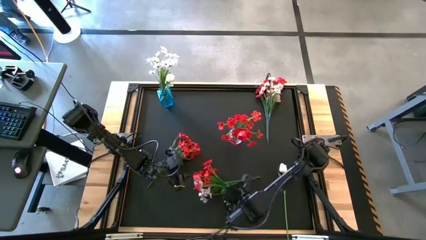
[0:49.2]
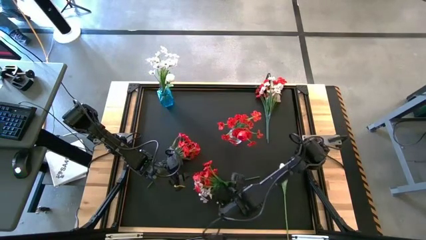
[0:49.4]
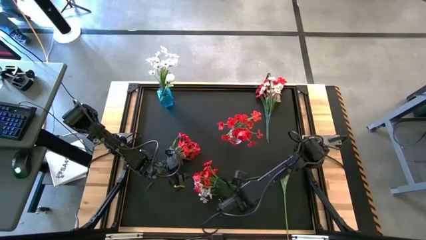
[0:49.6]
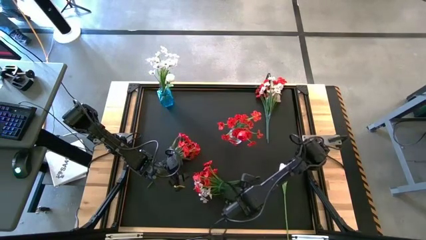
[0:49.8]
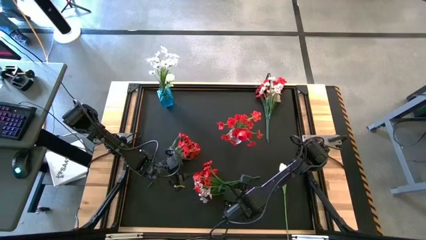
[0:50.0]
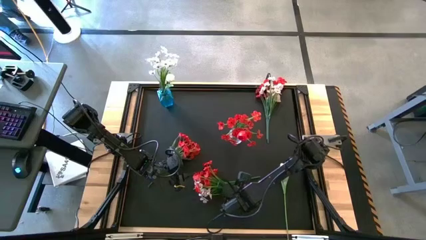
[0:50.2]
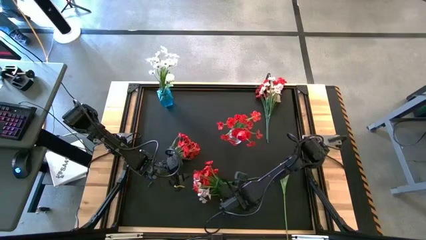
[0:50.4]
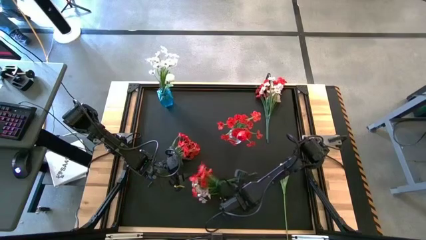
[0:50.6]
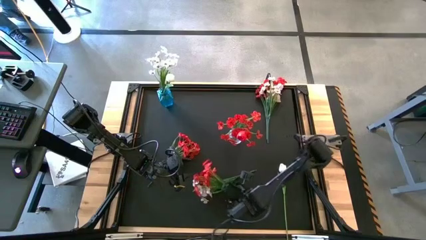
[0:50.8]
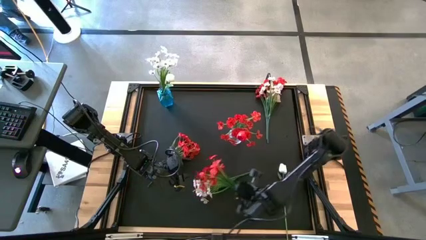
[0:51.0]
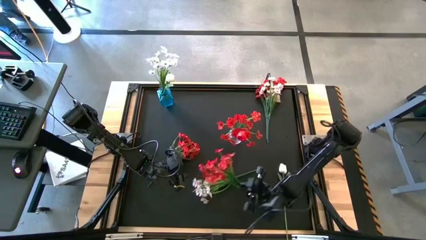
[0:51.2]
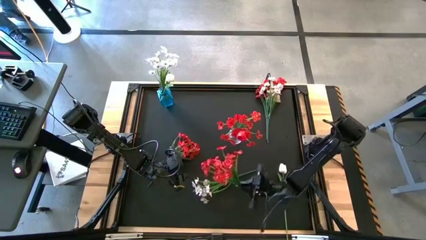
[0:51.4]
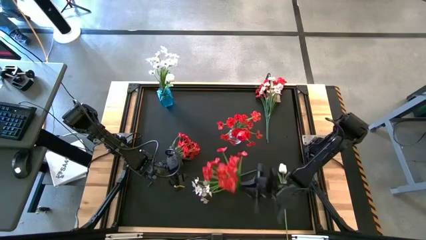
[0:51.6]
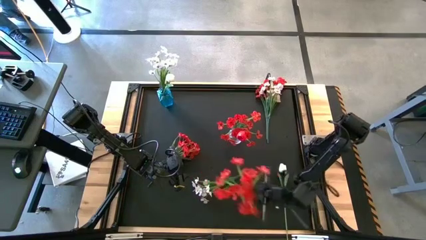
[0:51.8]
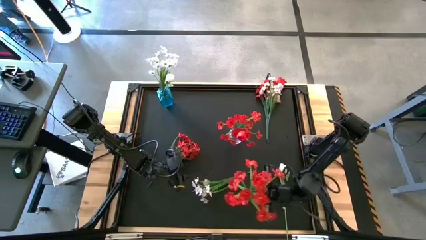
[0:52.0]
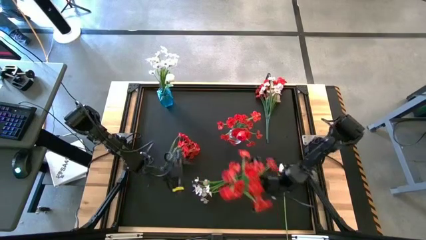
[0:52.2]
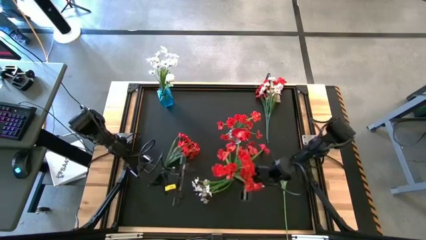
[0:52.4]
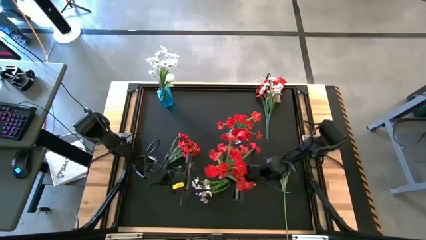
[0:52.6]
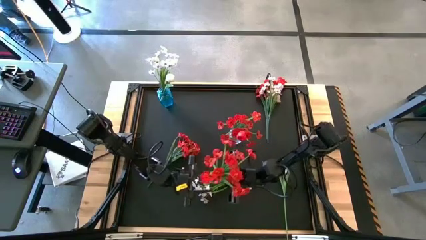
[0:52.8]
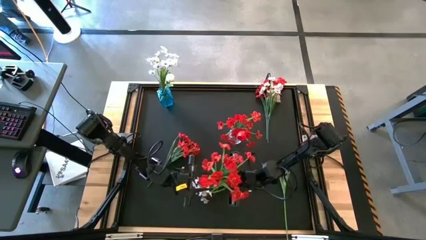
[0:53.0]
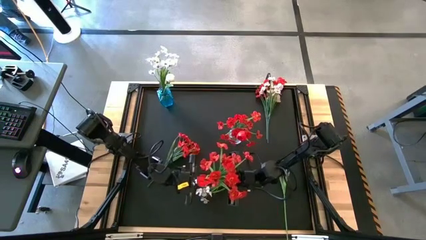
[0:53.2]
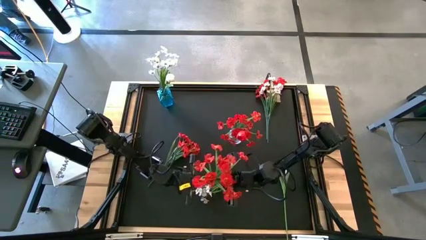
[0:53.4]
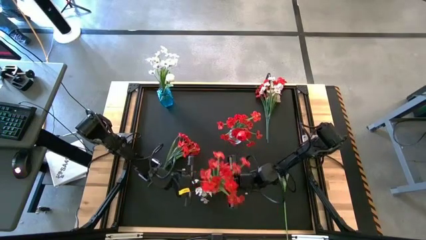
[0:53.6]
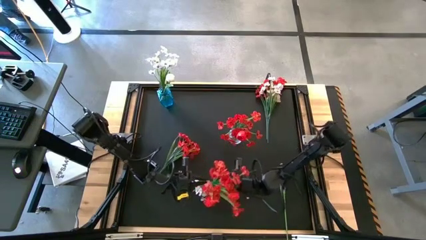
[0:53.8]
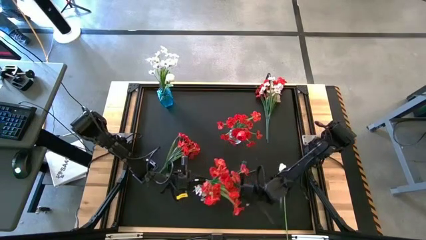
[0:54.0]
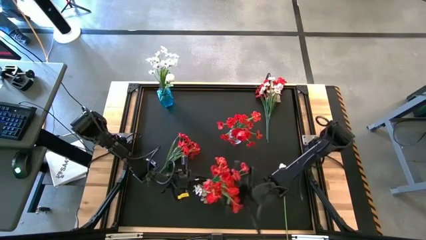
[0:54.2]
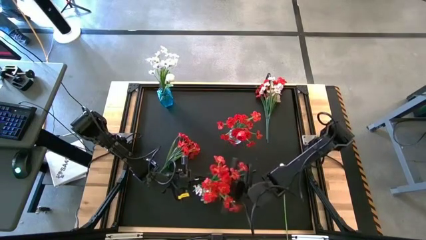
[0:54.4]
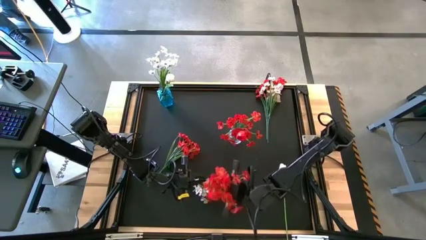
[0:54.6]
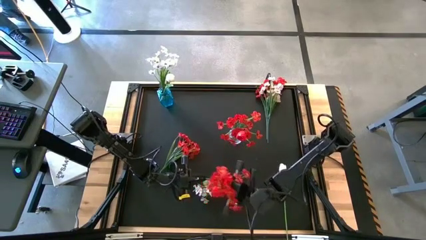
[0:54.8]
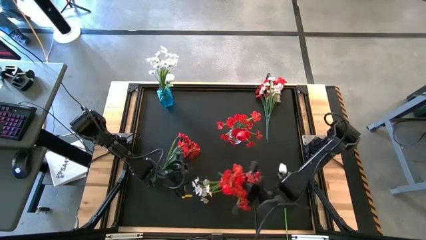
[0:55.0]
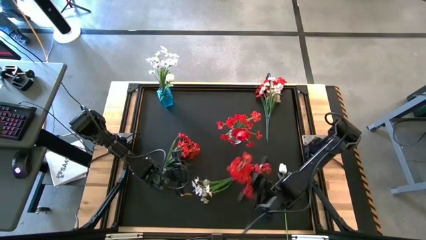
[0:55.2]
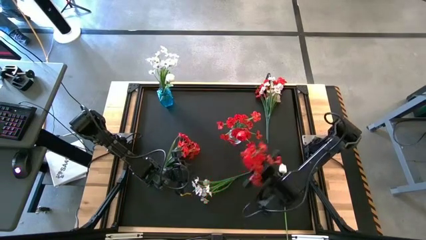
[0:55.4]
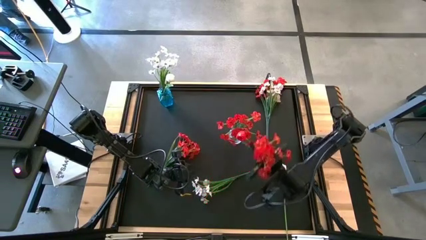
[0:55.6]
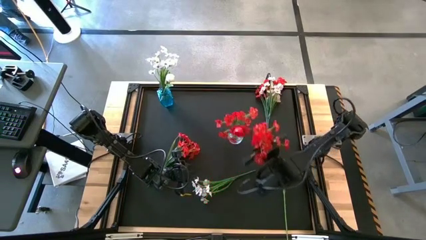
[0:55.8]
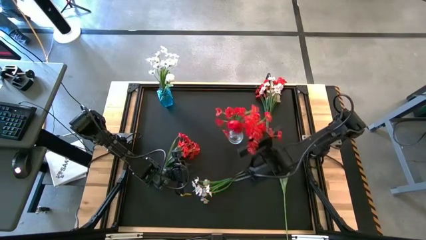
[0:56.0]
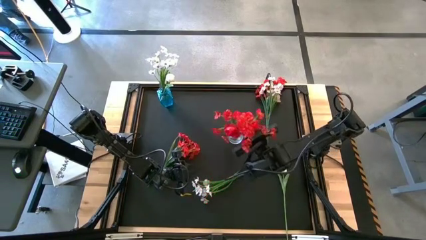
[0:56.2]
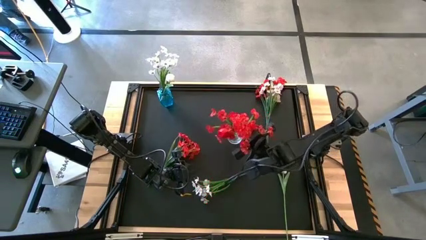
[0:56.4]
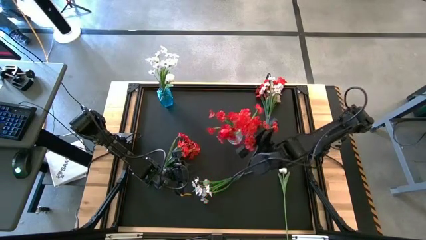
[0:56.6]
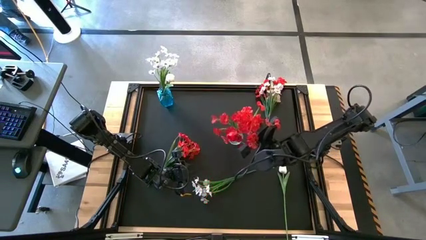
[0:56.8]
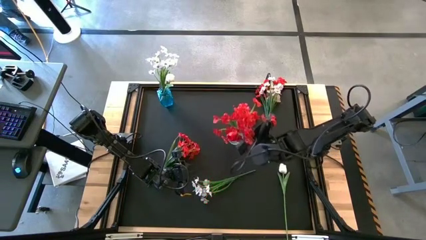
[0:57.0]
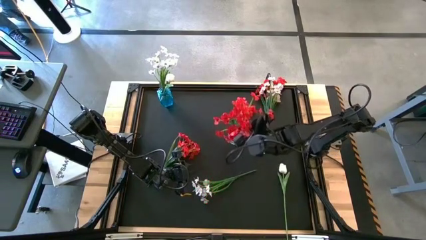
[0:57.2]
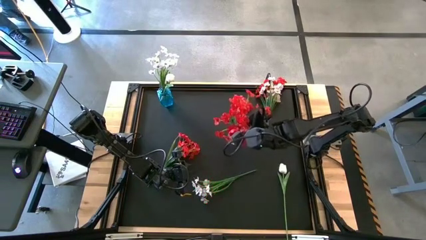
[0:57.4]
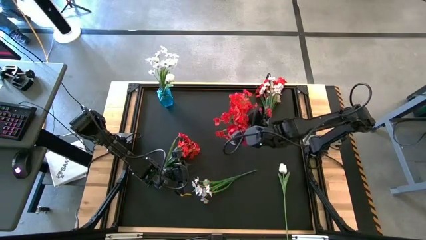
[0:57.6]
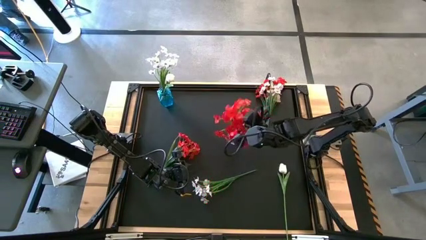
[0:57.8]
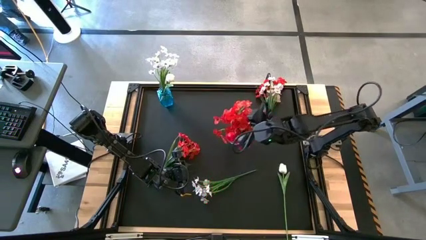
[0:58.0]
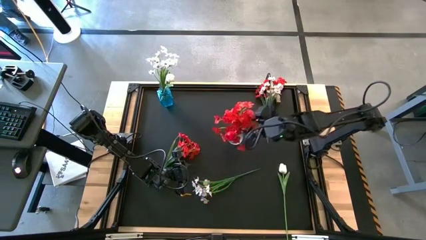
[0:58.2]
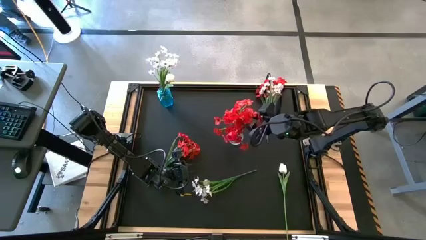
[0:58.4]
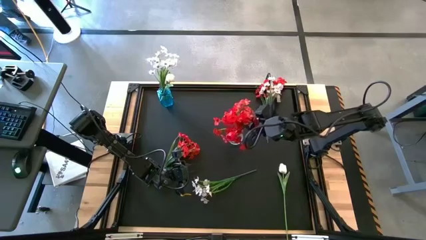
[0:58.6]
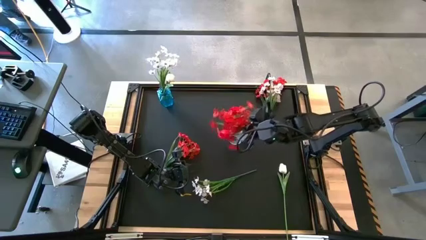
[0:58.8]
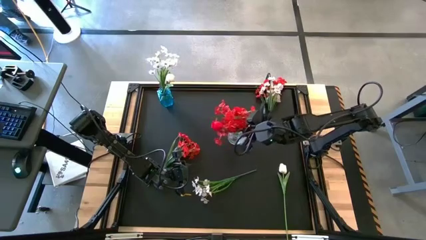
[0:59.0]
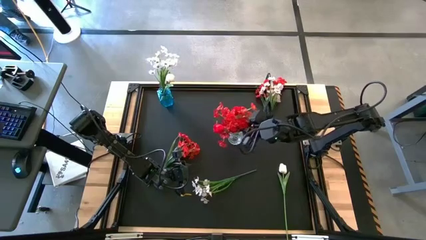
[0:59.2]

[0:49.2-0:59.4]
Task: Sort flowers into vase by color
Put the bottom right red flowers into the transparent vase

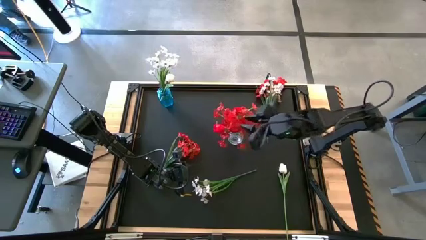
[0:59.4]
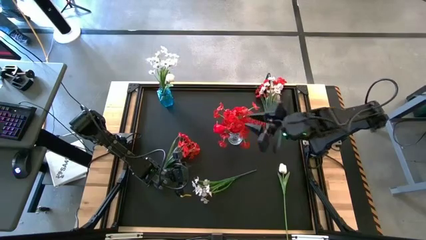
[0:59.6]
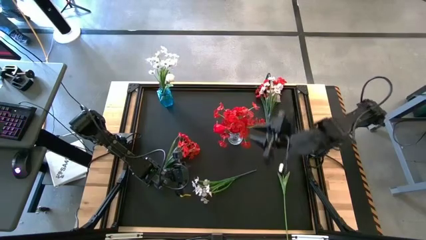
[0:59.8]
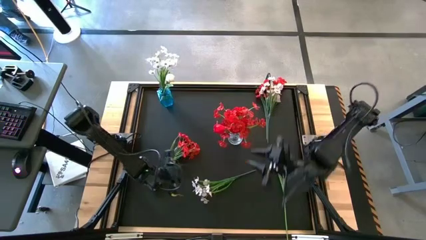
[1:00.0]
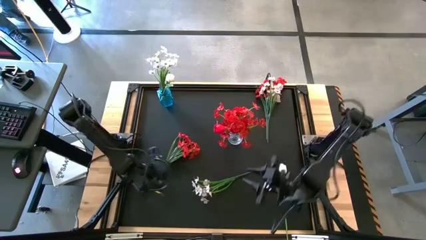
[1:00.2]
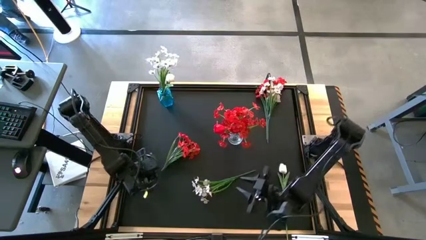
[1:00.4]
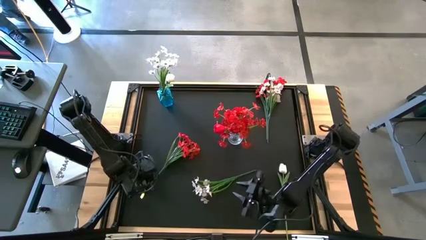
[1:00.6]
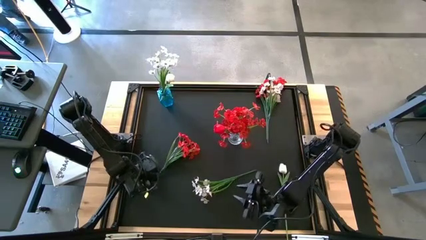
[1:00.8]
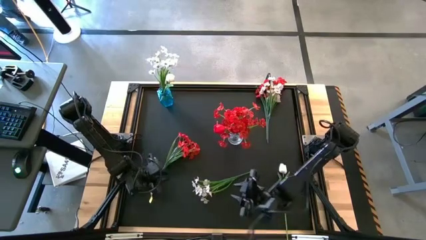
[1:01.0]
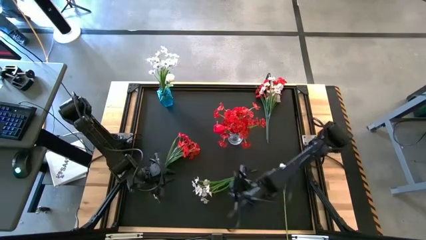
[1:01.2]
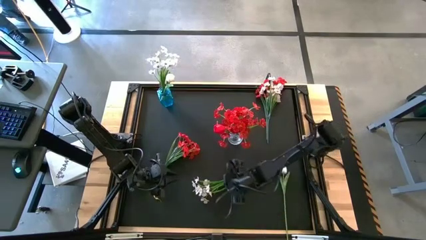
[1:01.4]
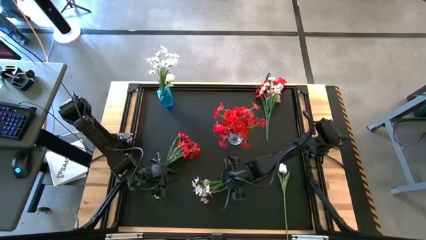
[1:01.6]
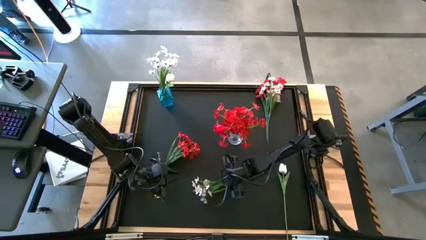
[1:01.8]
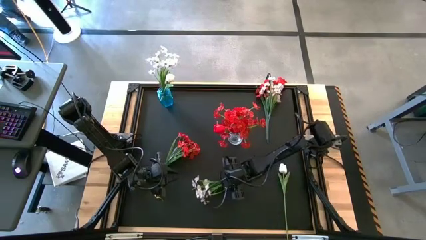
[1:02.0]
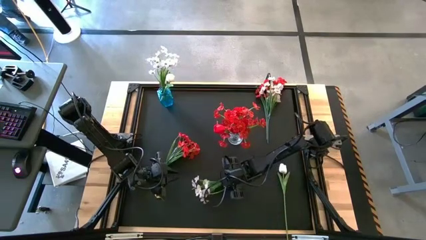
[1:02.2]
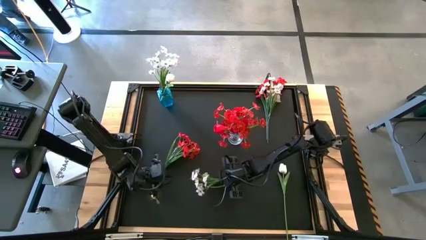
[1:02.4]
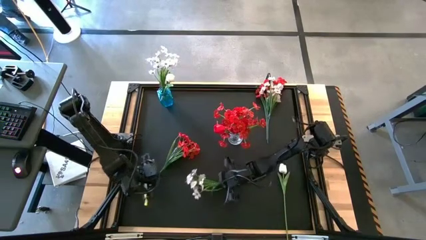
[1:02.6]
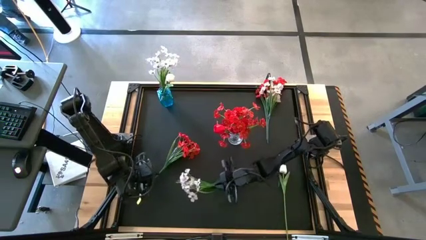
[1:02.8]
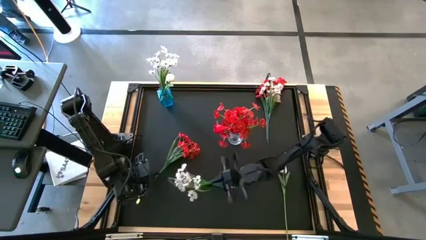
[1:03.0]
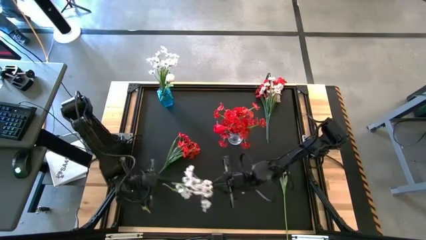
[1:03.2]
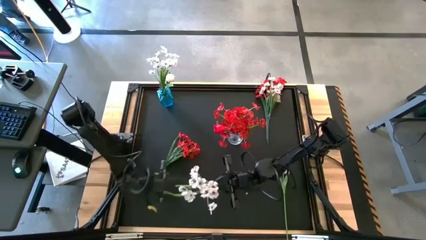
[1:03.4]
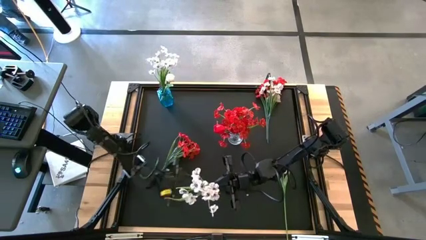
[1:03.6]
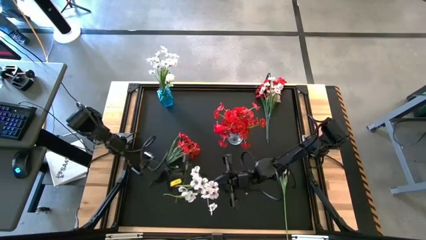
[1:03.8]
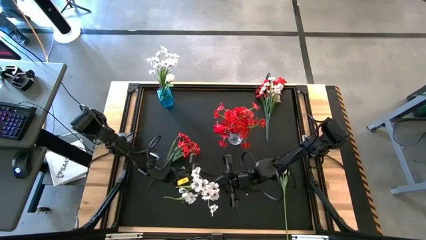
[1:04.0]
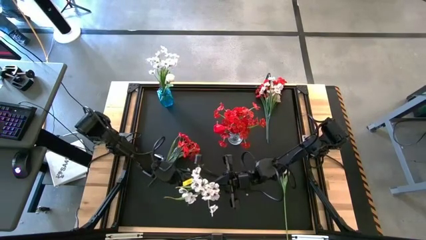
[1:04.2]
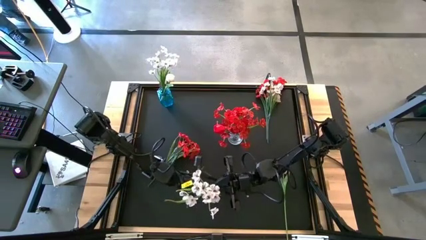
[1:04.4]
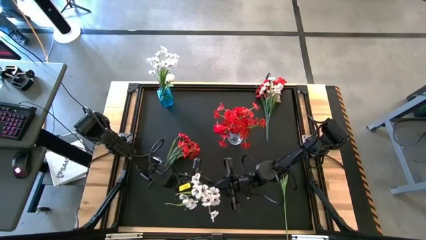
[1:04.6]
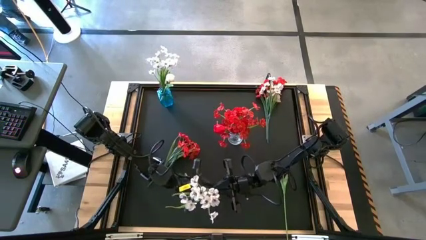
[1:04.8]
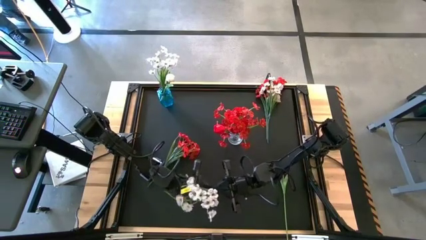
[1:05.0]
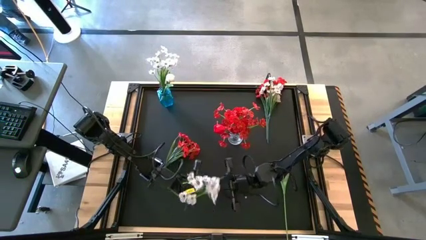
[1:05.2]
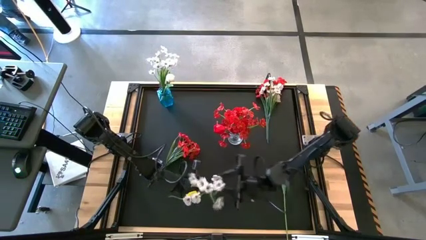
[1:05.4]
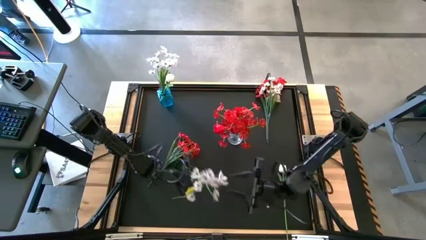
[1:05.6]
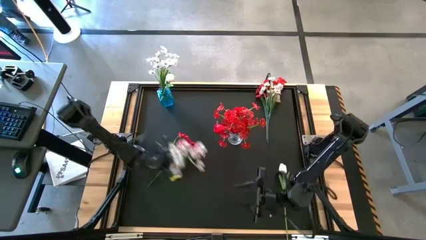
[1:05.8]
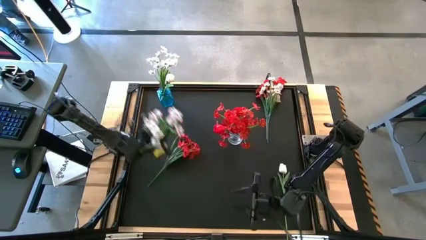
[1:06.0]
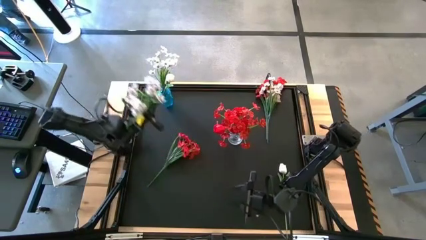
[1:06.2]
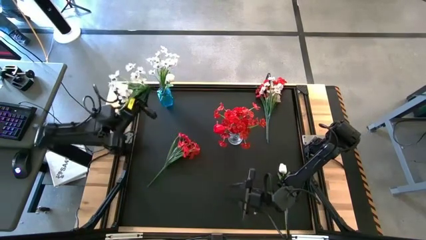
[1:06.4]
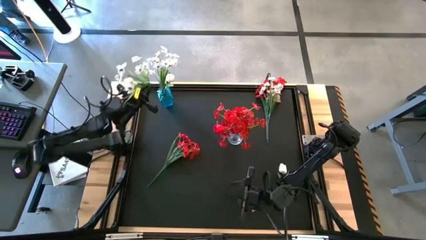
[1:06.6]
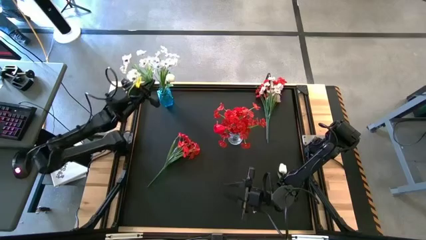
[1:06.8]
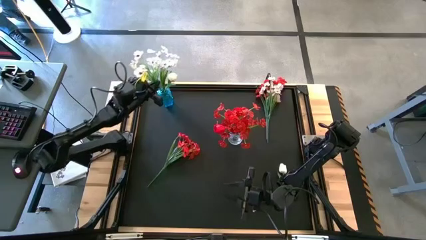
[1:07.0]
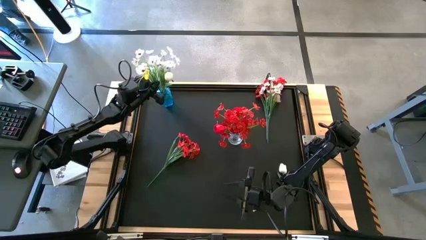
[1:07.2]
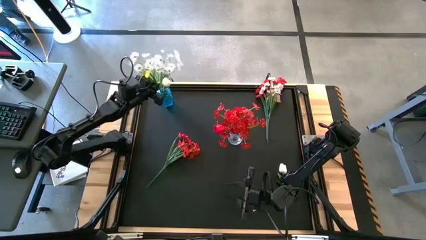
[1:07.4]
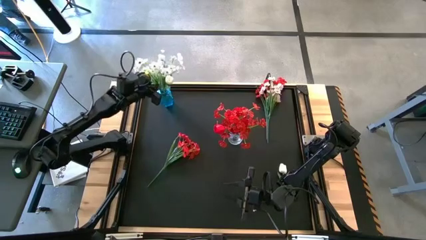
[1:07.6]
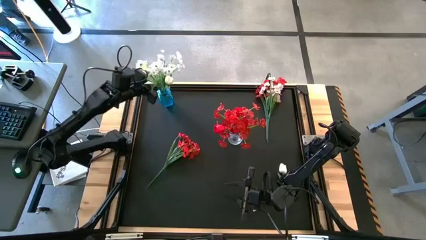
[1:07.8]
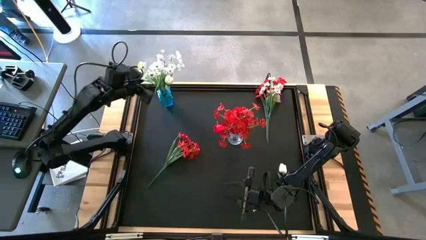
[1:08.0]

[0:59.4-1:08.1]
Put the bottom white flowers into the blue vase
